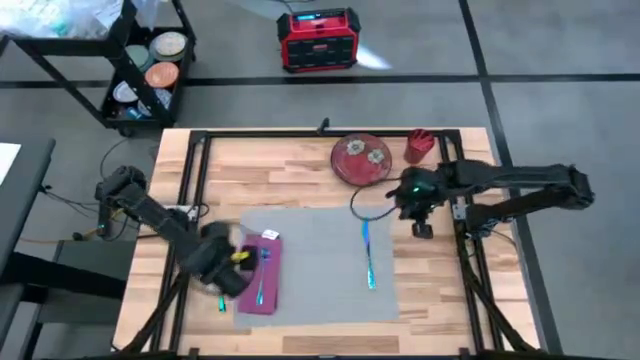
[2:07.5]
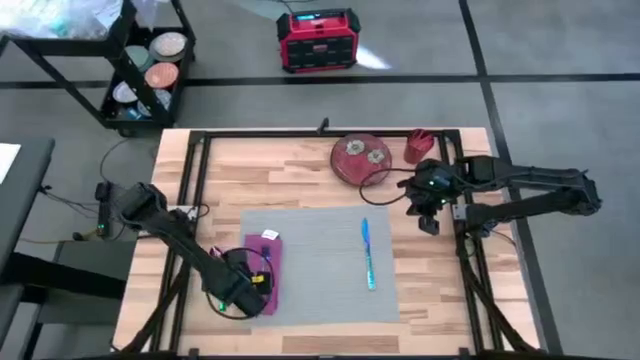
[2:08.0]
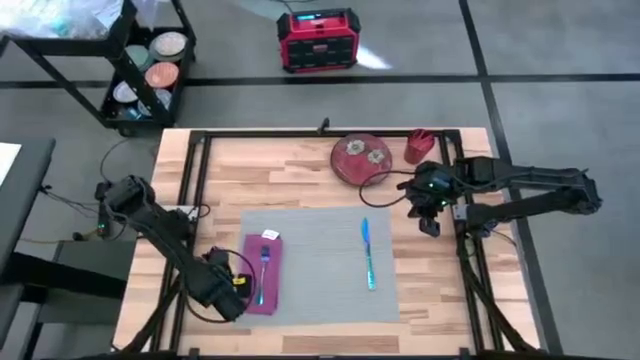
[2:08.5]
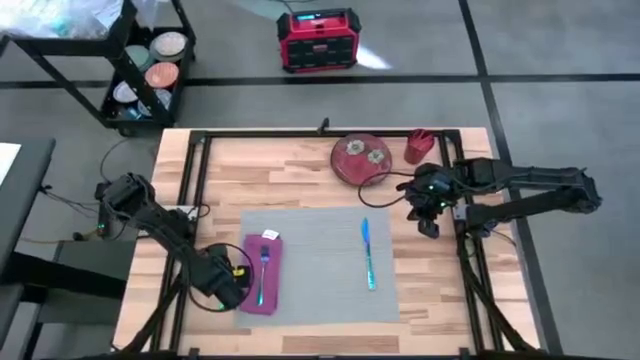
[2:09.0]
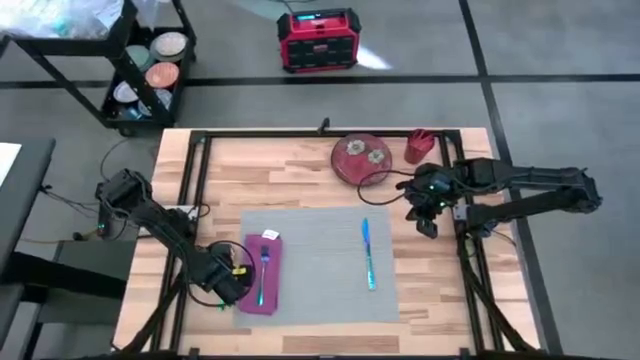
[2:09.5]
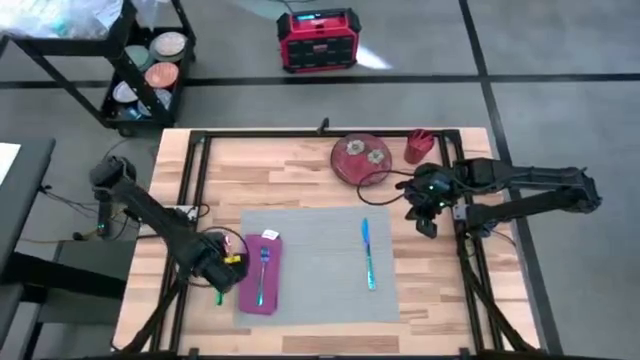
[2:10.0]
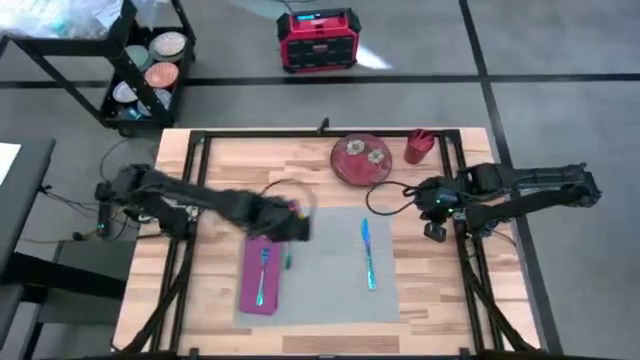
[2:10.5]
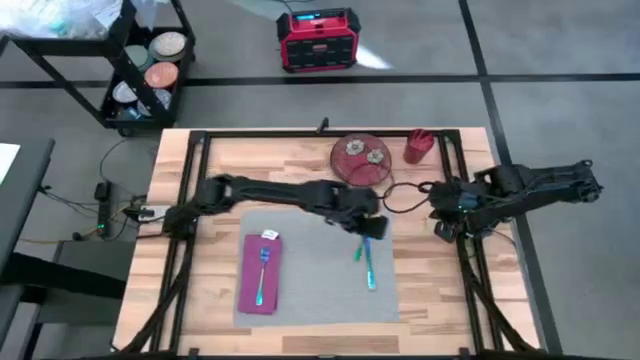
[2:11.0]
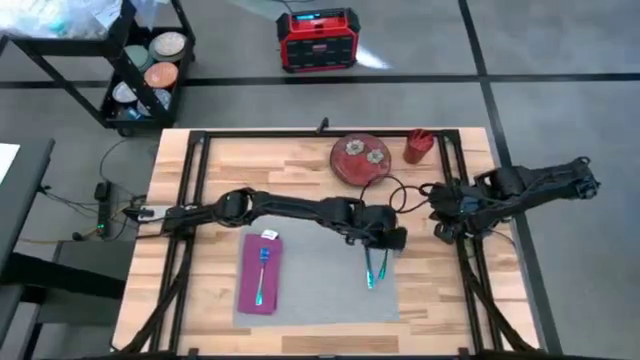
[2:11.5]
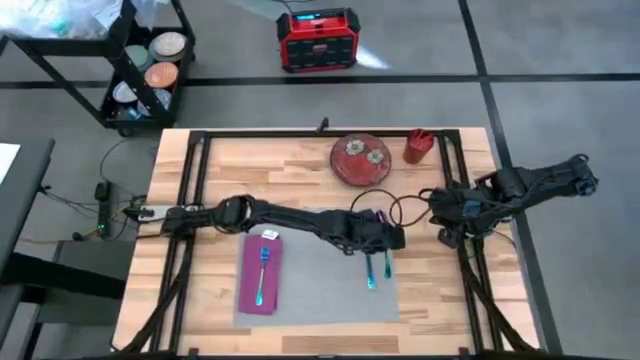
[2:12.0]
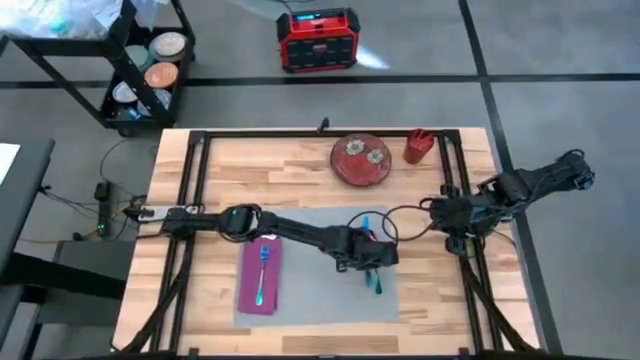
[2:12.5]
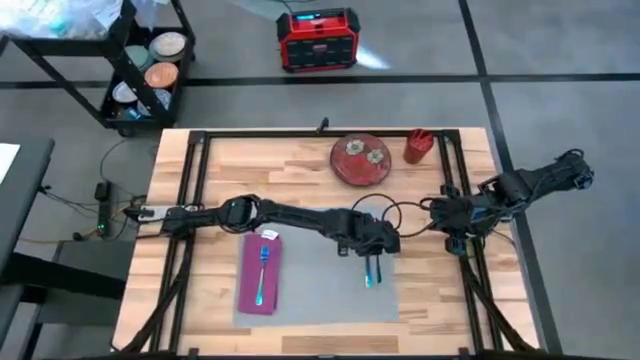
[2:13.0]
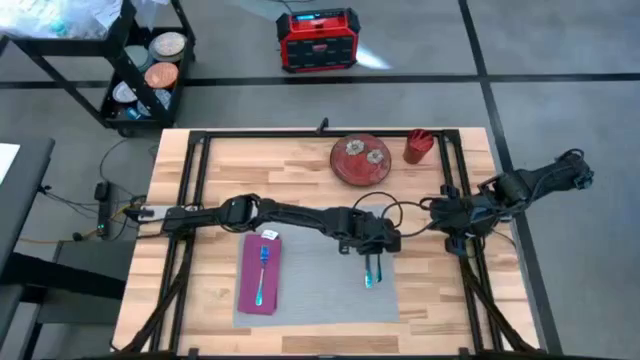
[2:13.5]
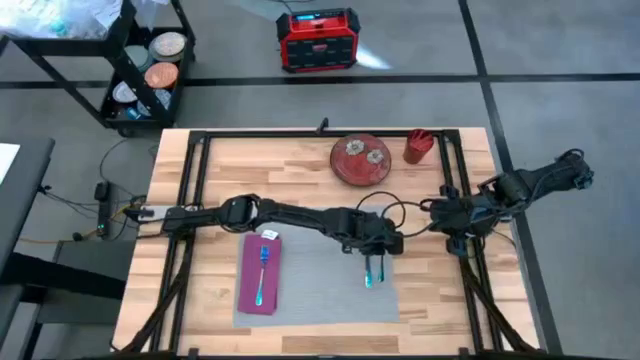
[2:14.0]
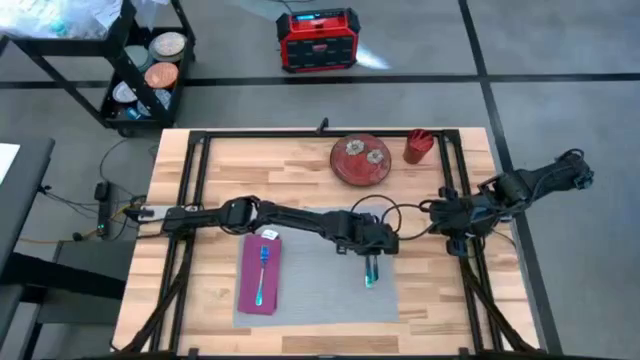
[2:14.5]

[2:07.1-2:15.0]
Task: Set table place
Put the blue spoon on the gray placemat to the right of the blue table knife

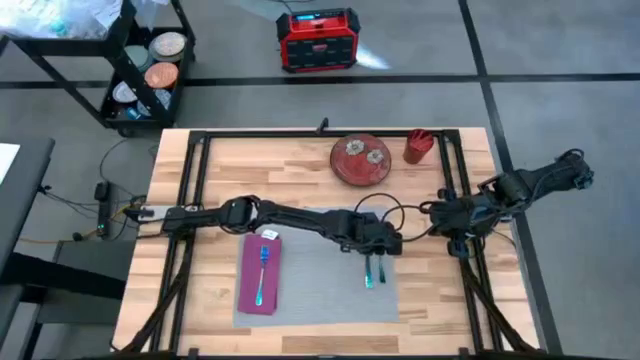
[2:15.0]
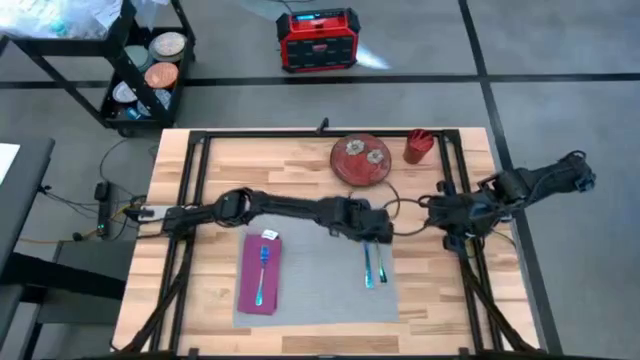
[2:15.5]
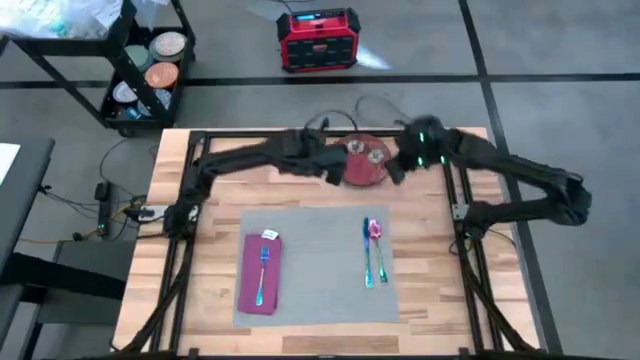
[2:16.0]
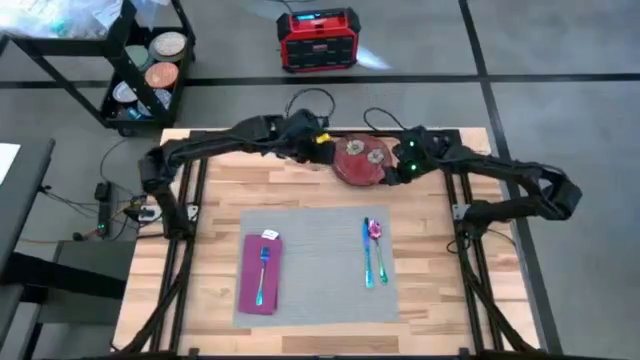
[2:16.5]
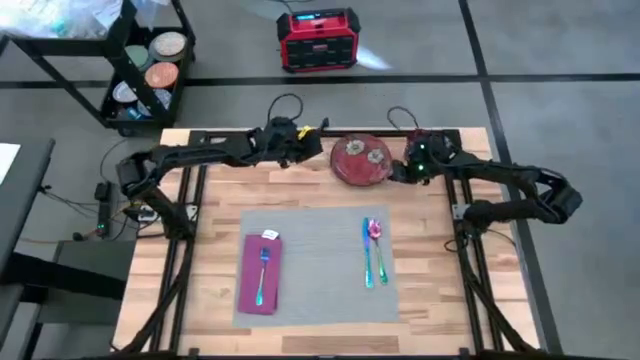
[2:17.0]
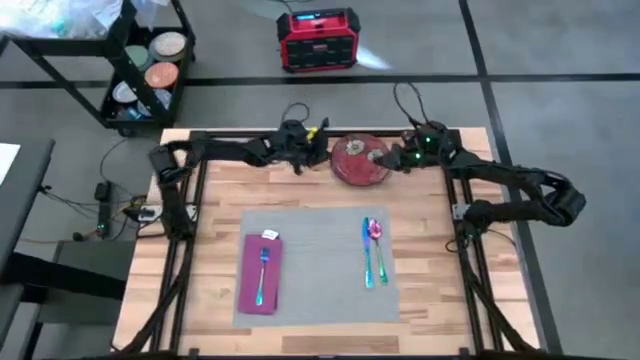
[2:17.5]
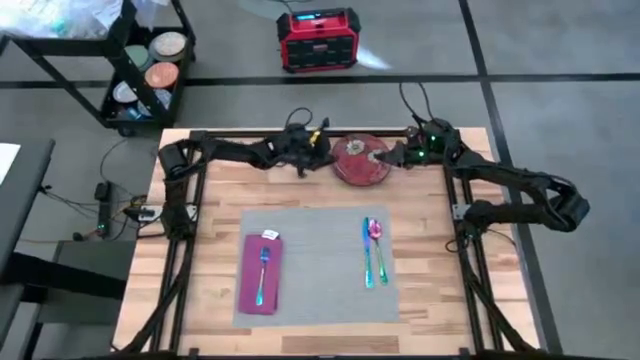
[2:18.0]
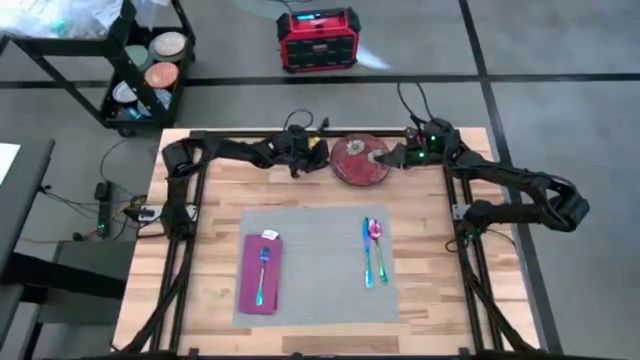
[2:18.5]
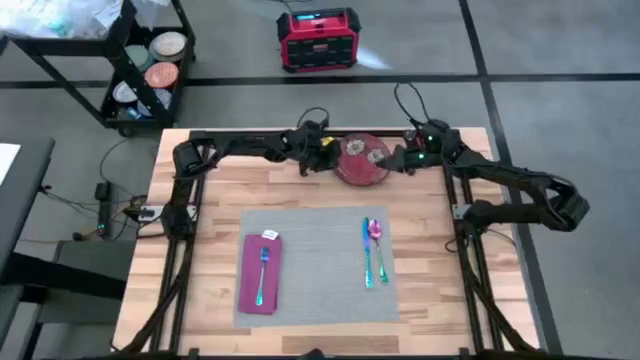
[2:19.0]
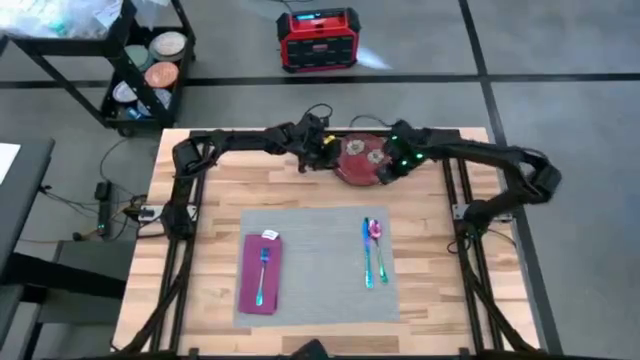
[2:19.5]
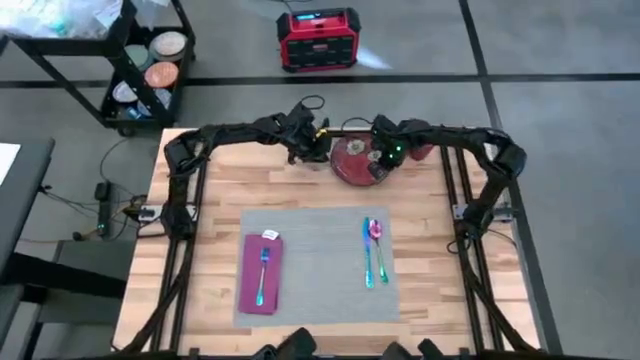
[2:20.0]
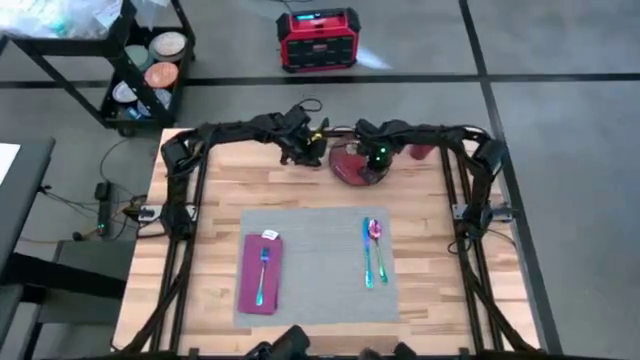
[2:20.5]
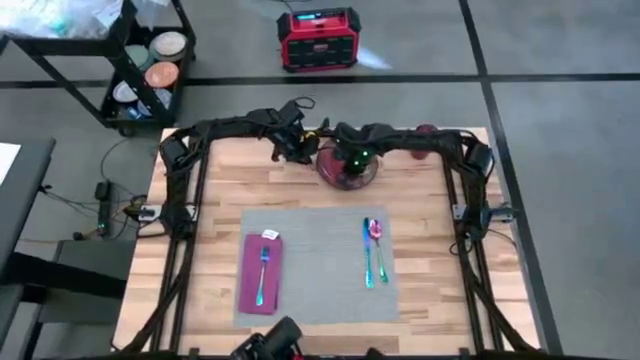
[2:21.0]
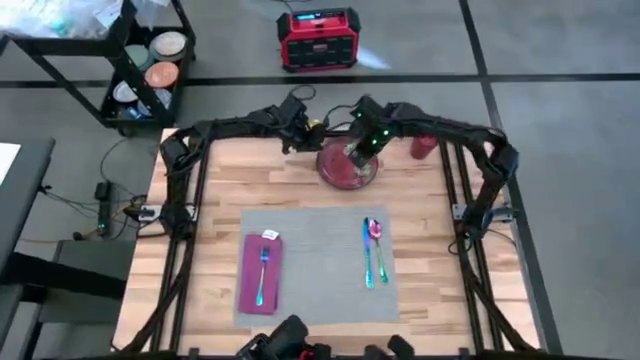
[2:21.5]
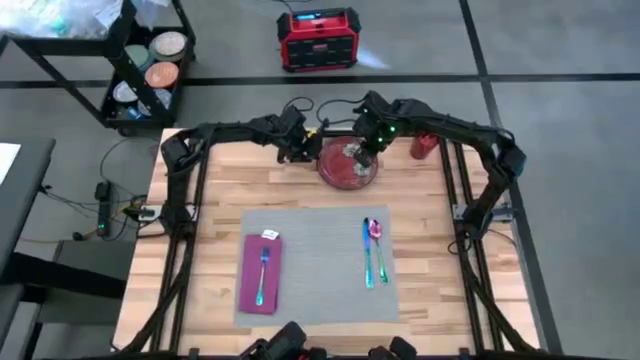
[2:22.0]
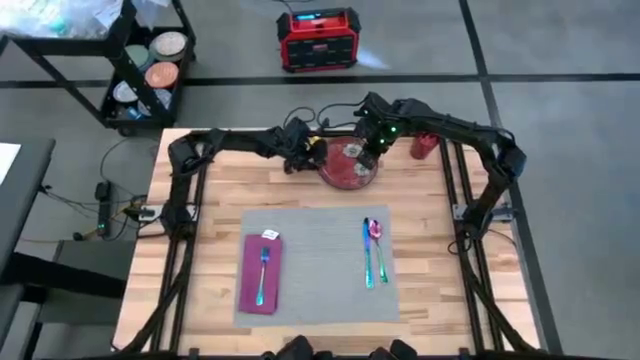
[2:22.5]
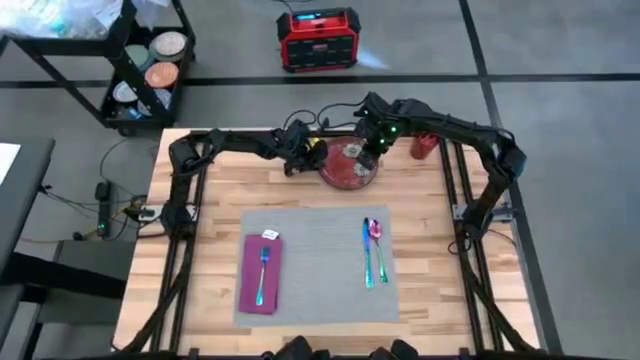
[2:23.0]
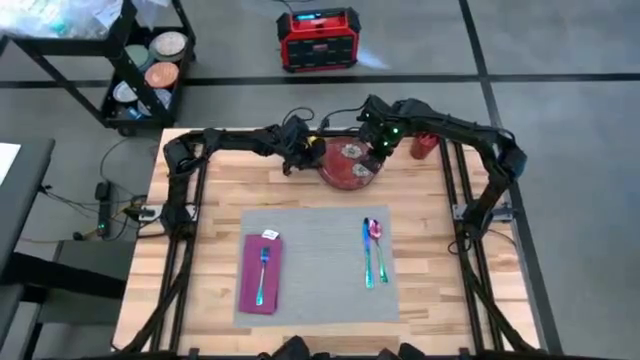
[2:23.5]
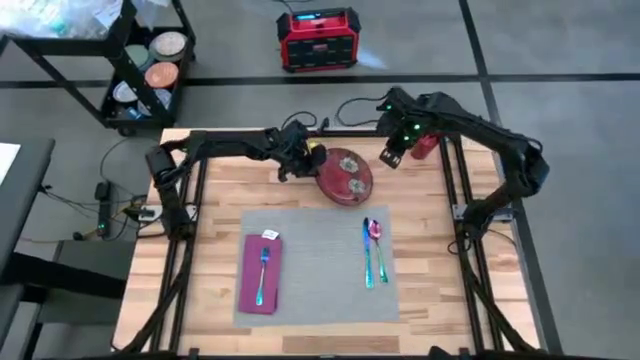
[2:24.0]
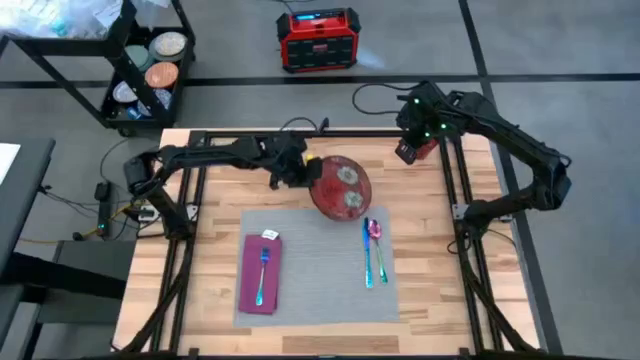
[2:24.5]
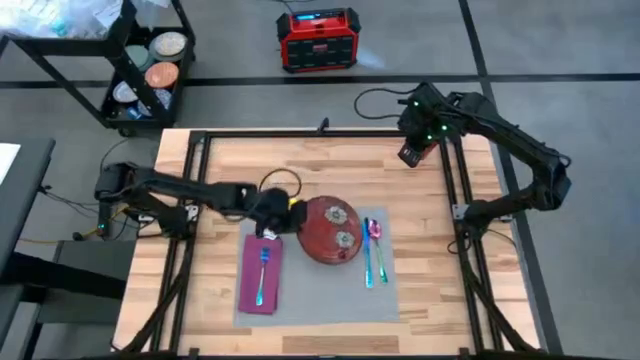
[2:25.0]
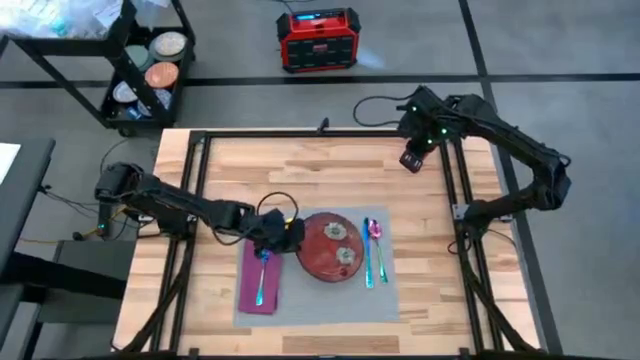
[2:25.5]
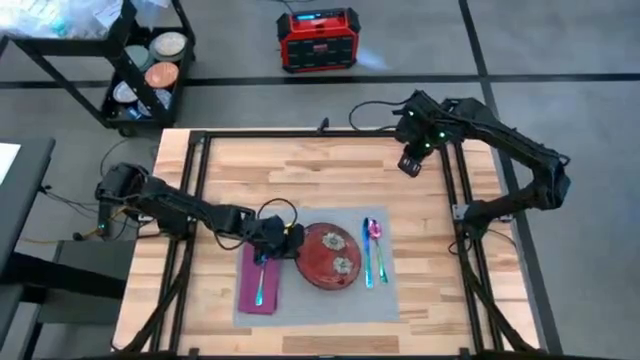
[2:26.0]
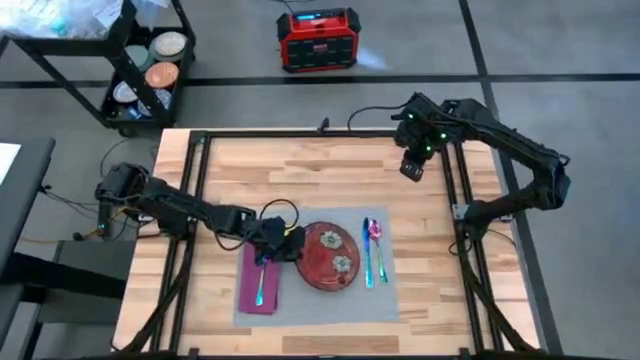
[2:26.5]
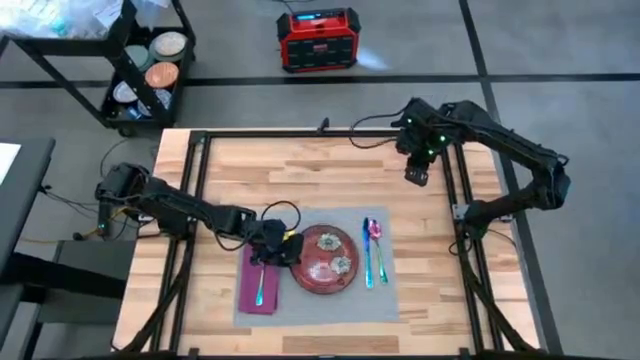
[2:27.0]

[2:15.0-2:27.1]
Put the red plate on the gray table mat

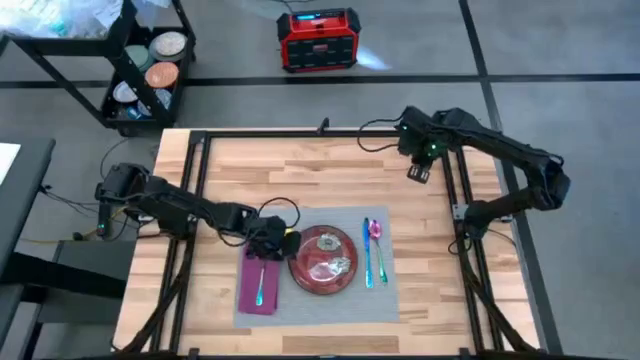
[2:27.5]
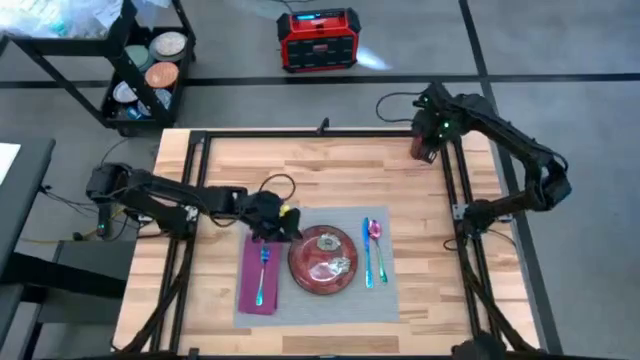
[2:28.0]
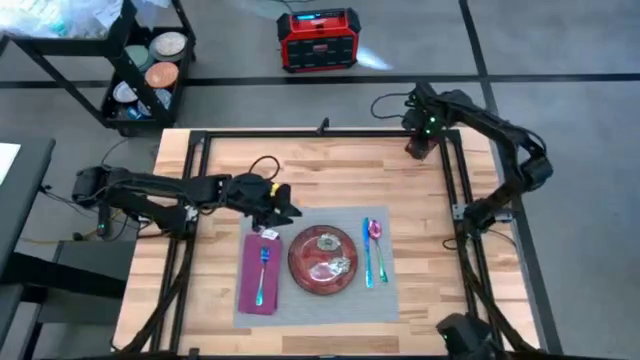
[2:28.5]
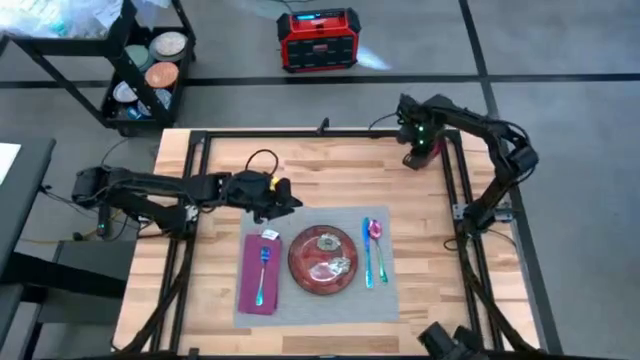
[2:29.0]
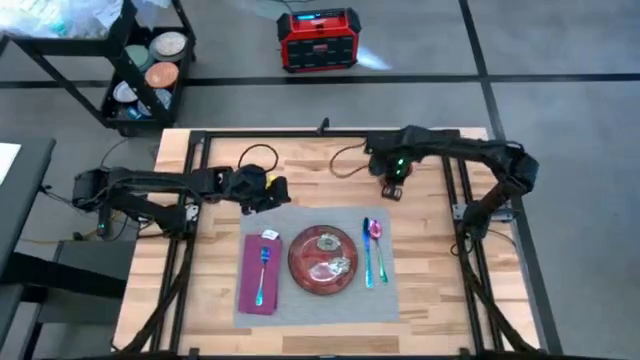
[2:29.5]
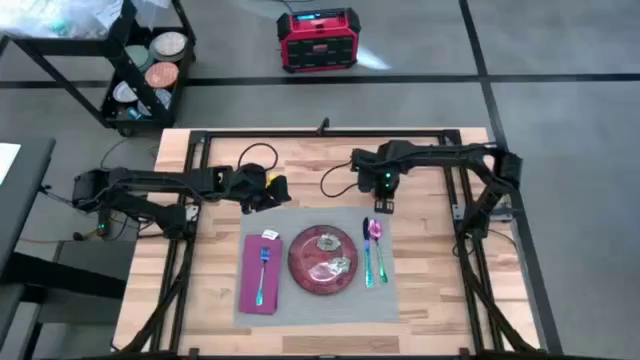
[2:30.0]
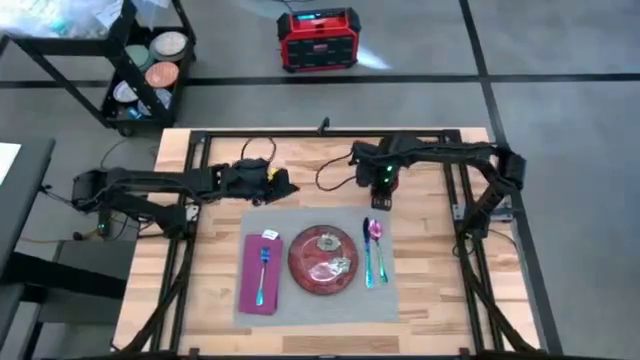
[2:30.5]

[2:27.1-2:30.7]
Move the red cup to the top side of the gray table mat
